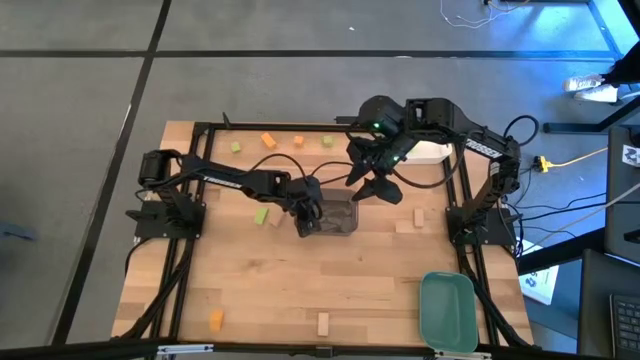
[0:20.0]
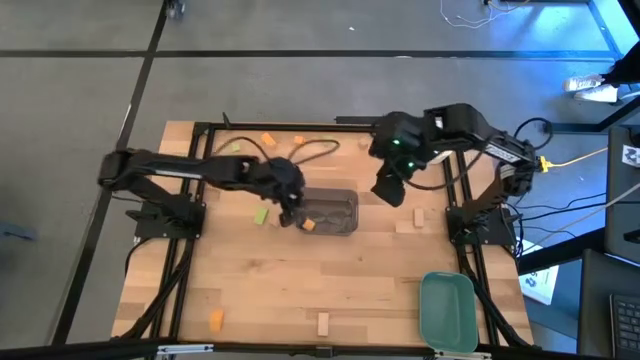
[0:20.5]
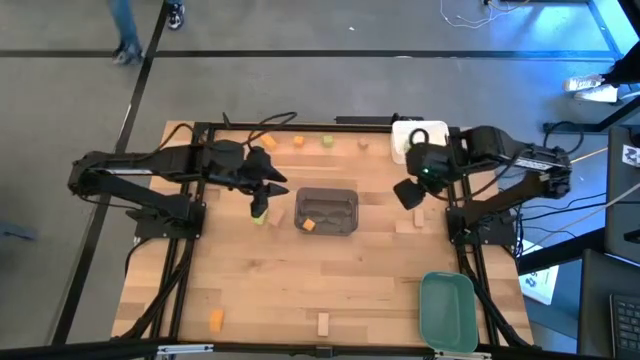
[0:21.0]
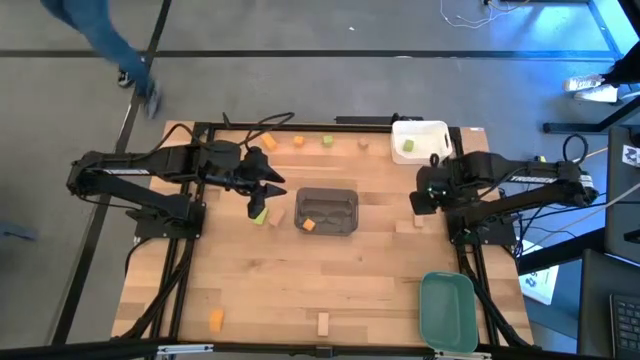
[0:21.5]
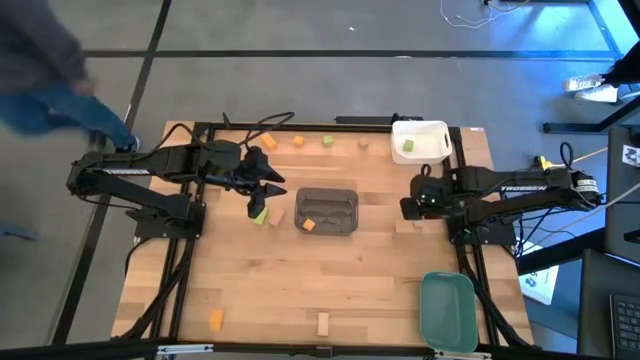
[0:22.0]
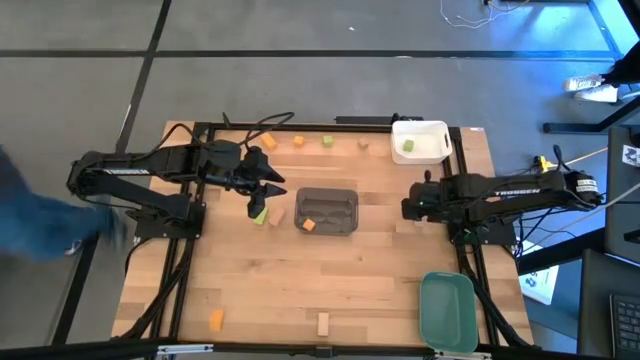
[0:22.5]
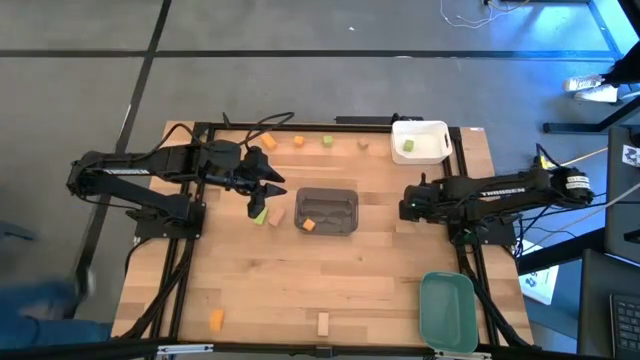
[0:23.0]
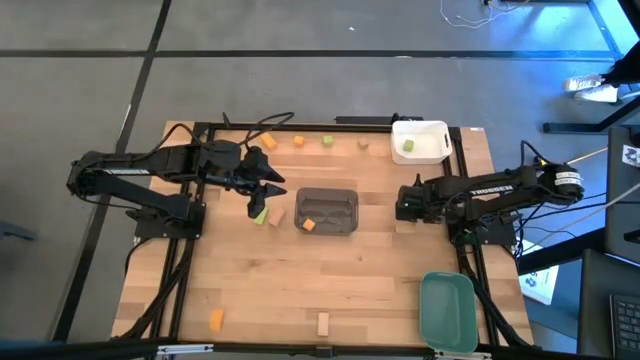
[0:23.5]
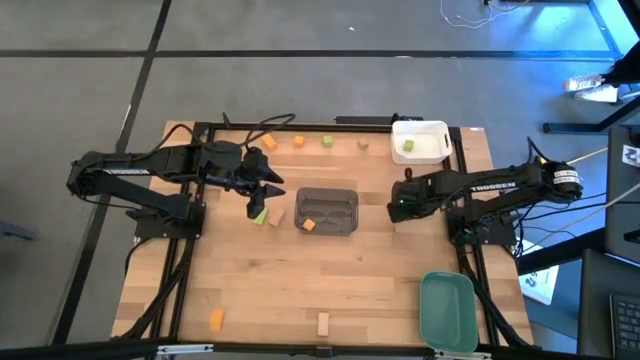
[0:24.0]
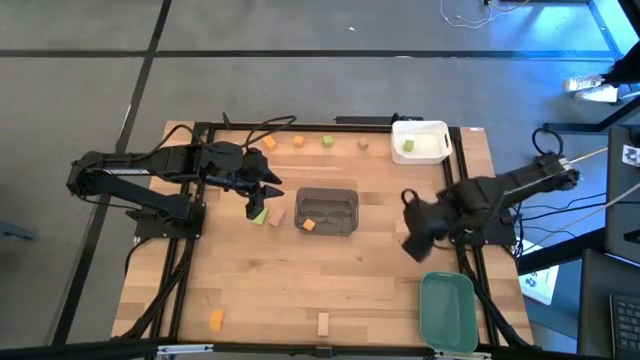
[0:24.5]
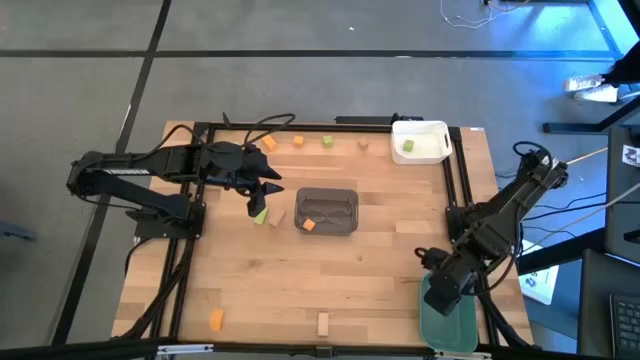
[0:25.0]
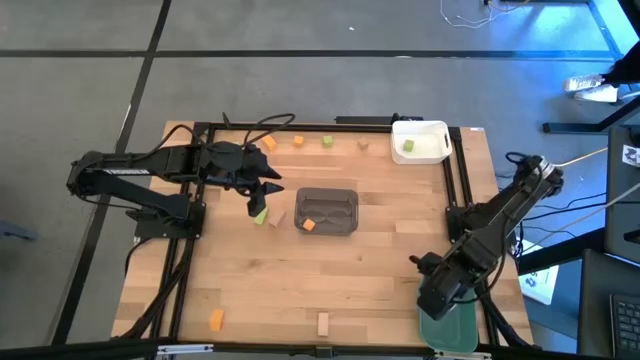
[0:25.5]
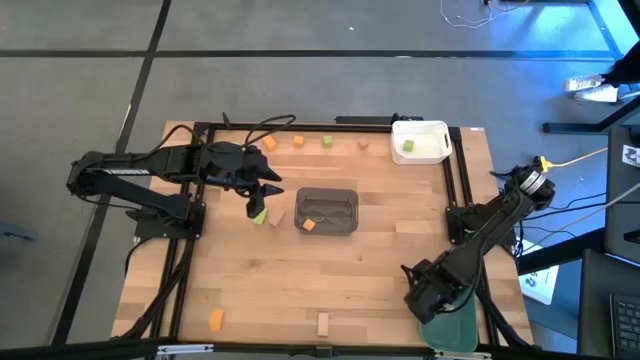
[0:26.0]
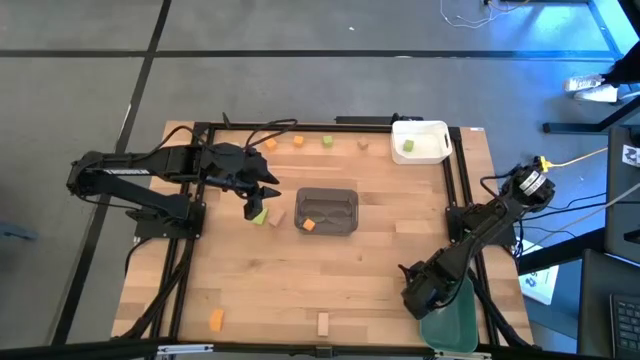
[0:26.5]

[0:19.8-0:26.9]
Task: Sort & place blocks by color
Put the brown block into the blue bin

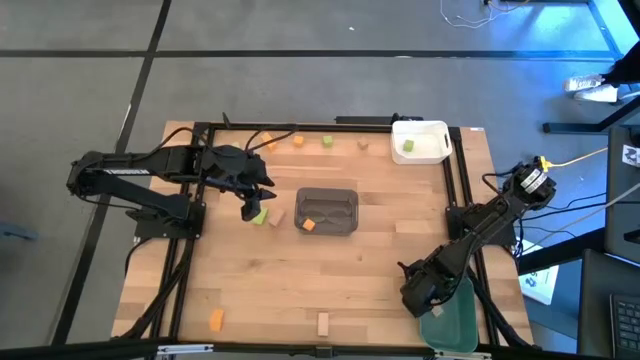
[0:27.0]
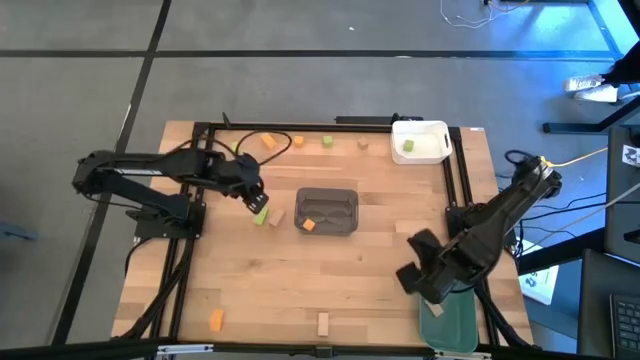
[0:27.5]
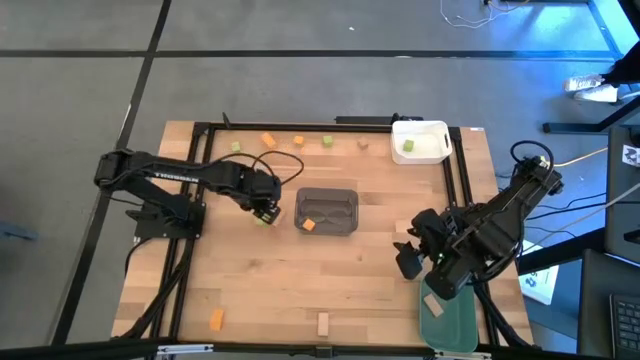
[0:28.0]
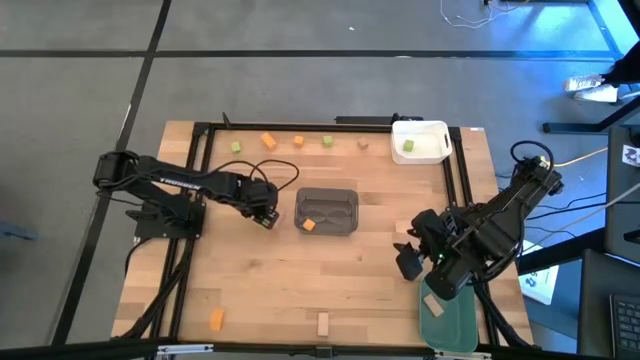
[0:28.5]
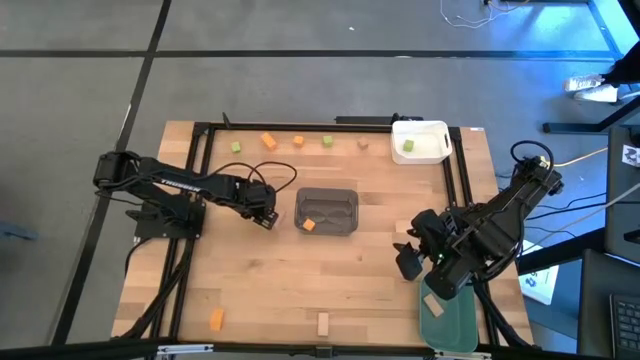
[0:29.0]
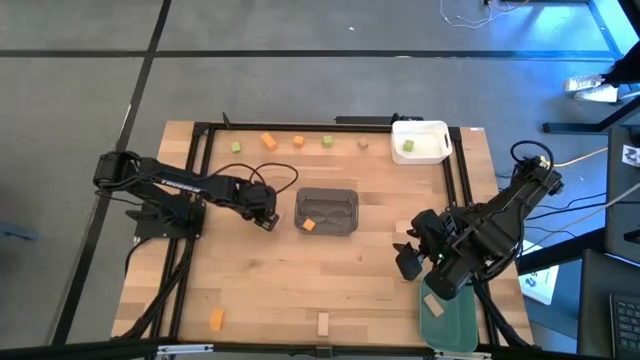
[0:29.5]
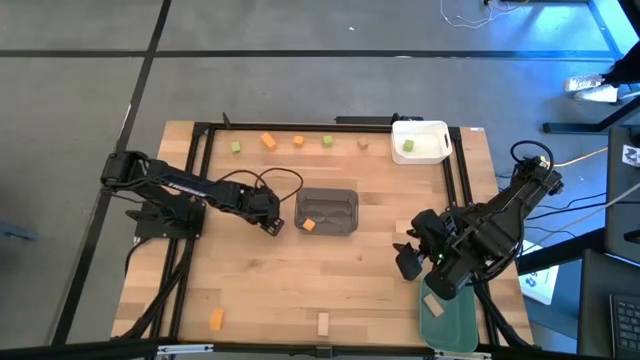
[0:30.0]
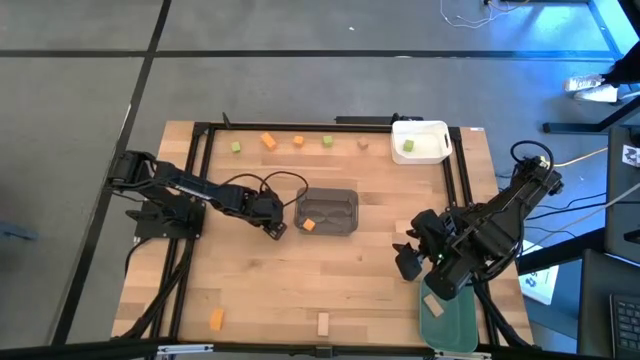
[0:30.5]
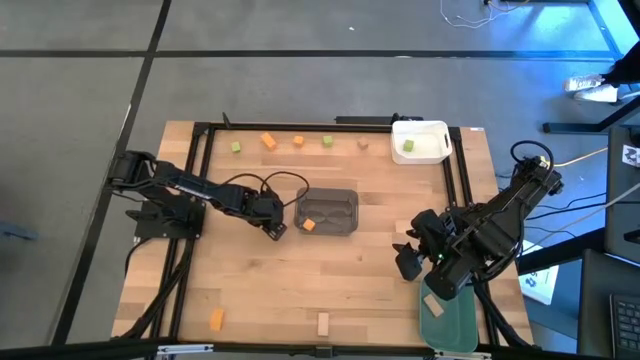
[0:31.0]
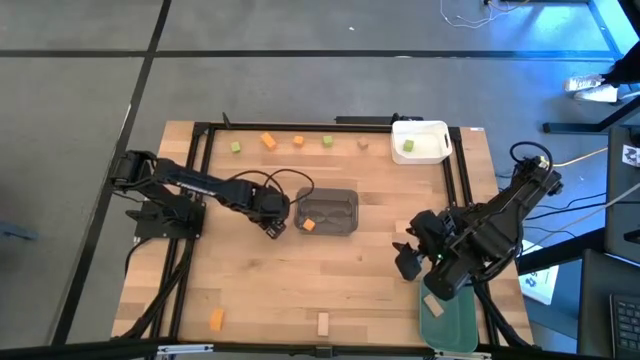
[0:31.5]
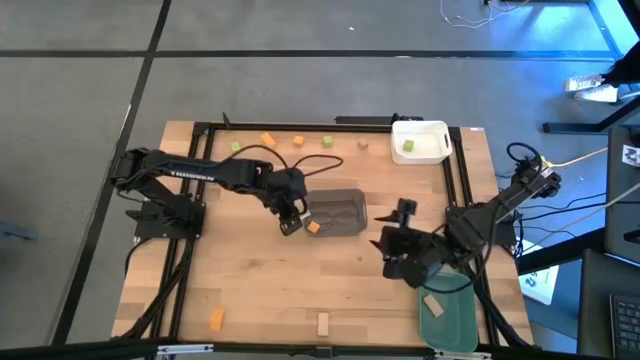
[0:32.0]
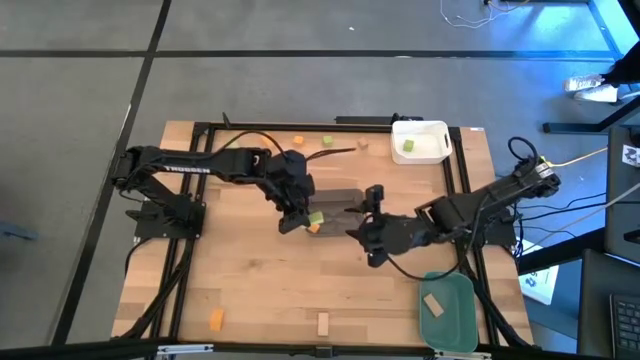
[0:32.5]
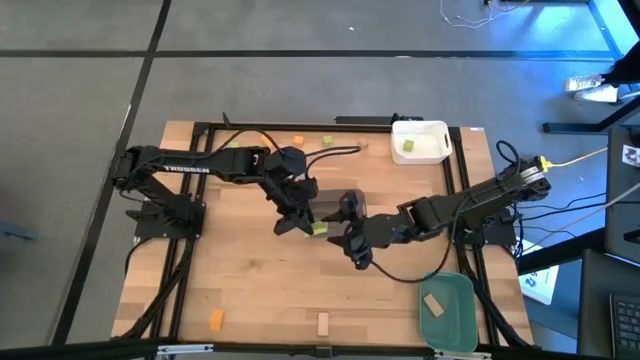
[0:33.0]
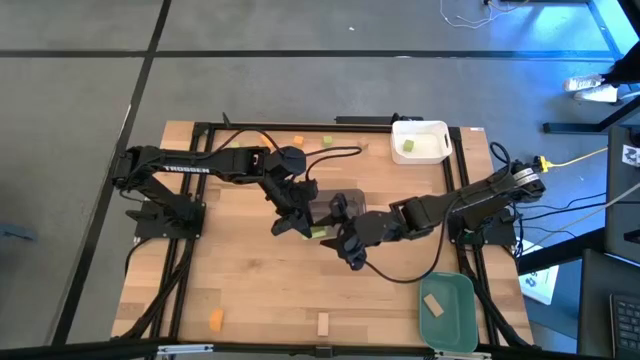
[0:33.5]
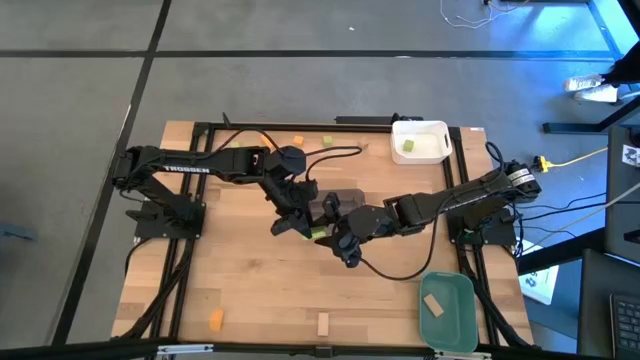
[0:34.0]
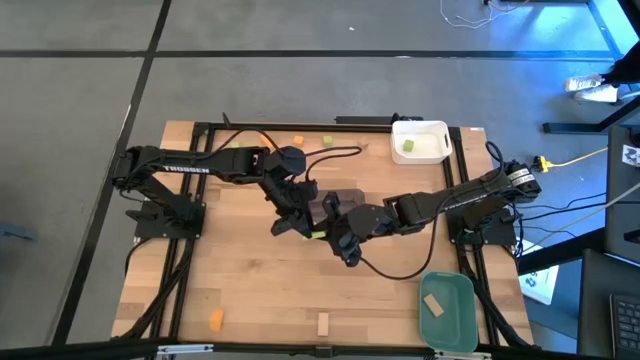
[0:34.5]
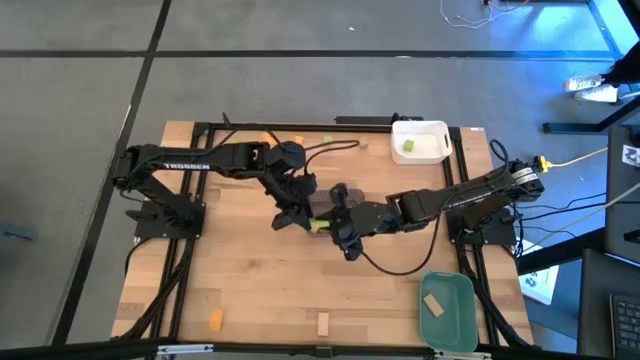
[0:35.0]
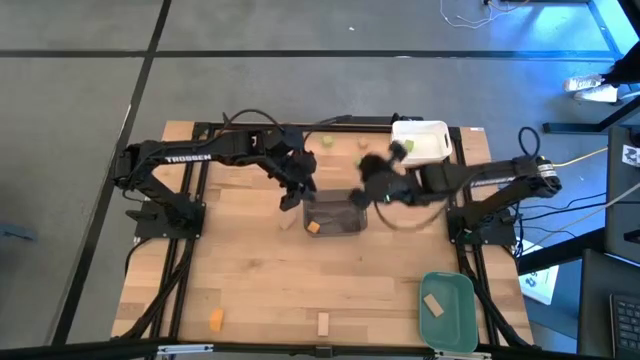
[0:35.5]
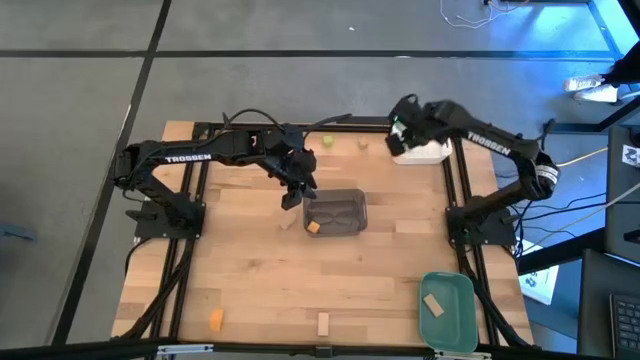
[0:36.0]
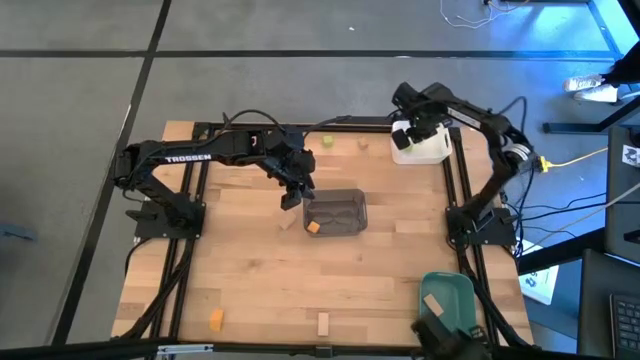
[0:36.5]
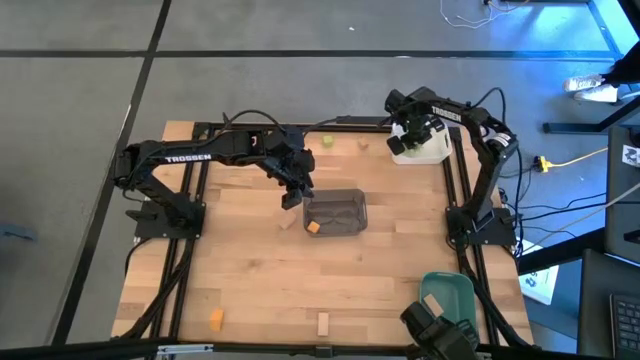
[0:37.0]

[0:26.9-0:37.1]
Put the green block into the white bin

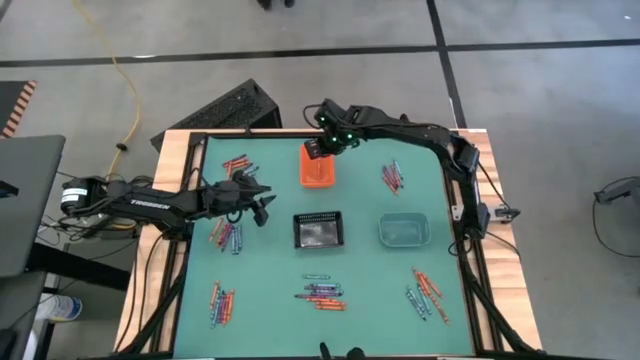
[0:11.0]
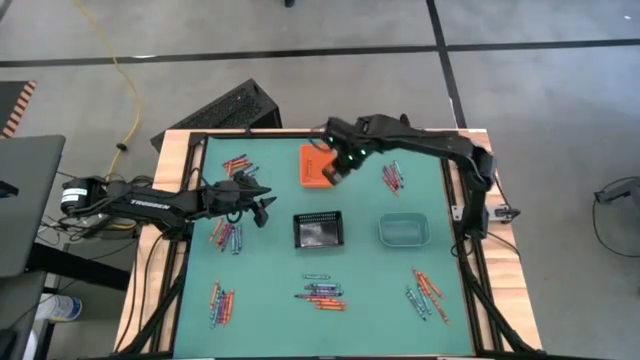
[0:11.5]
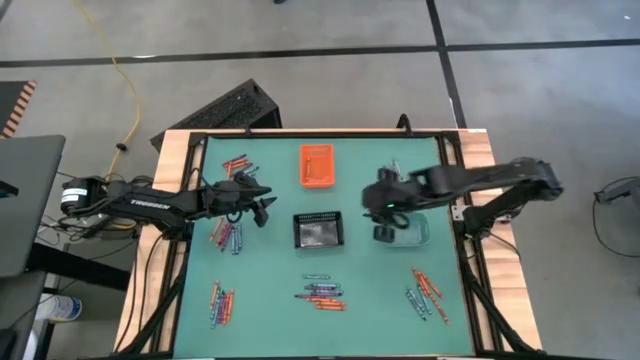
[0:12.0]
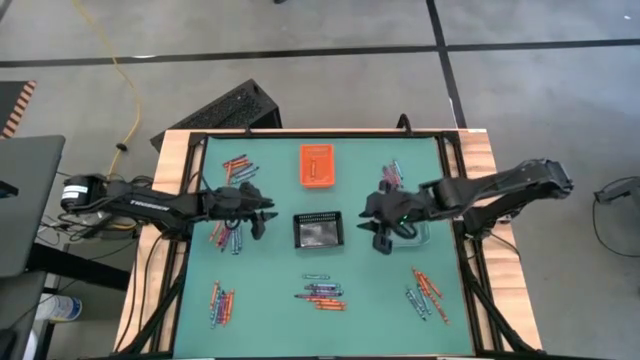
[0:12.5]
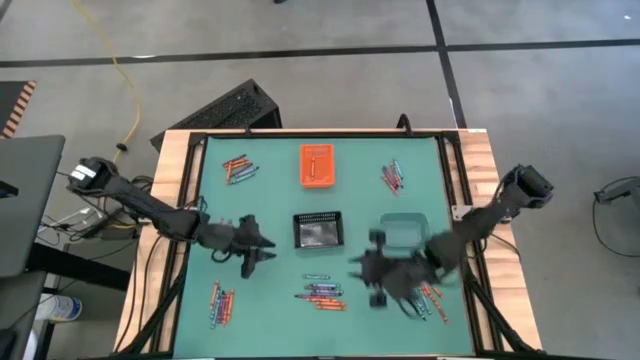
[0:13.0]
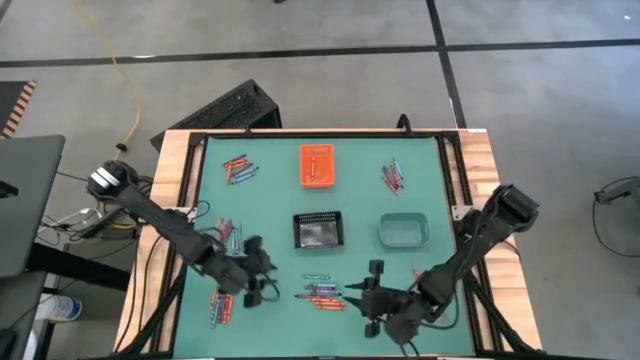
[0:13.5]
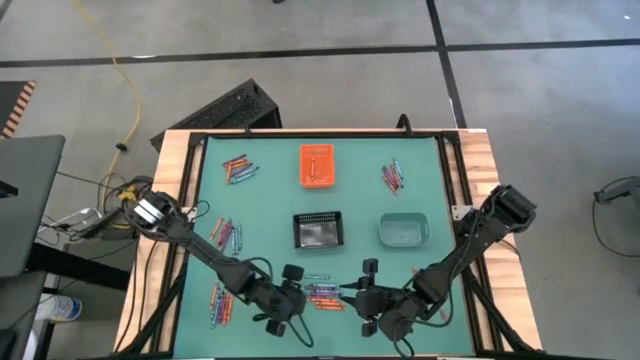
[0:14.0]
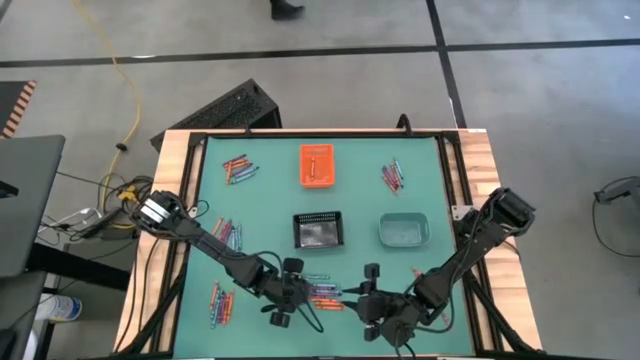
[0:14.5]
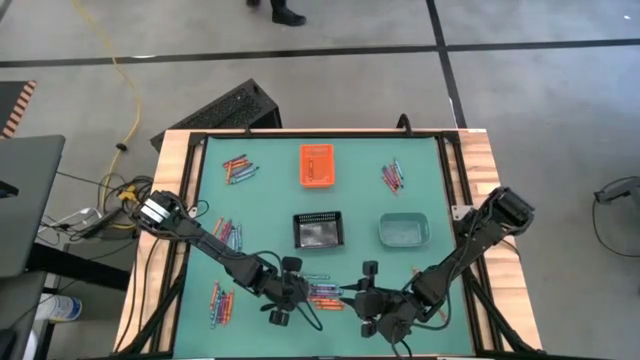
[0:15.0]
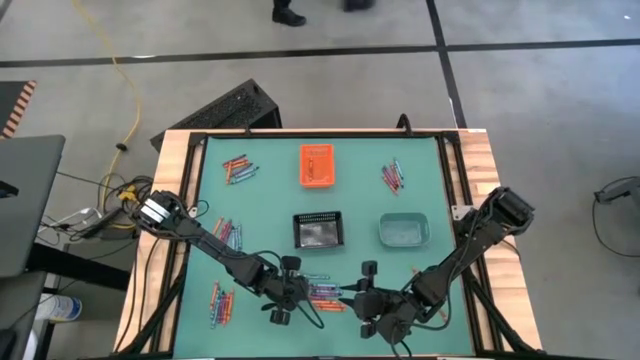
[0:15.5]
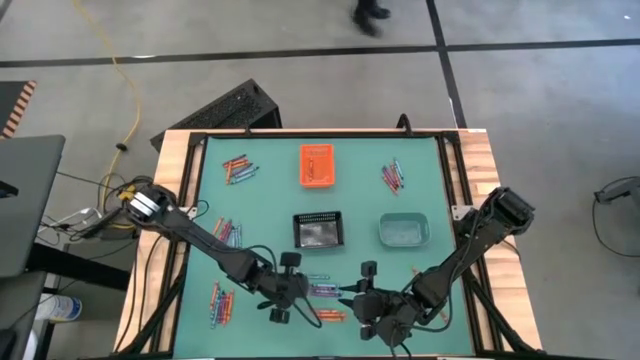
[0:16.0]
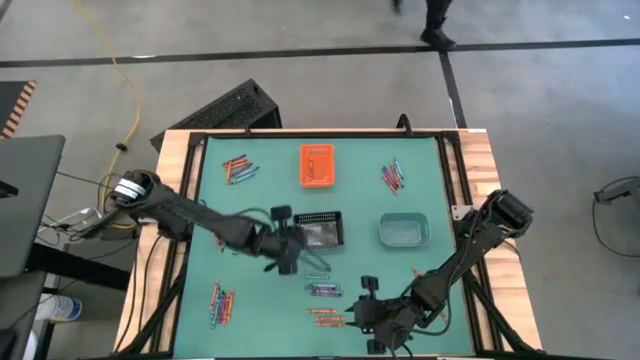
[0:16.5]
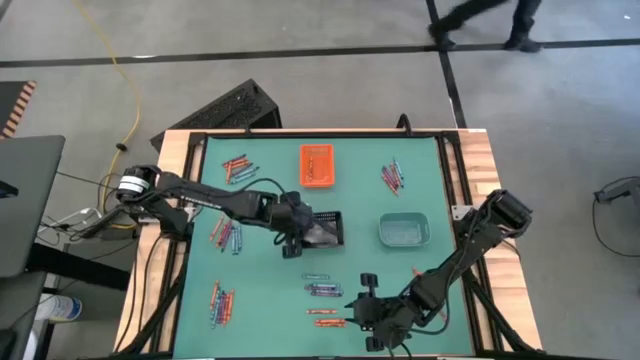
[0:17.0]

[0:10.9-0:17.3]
Task: Sort crayons
Put the violet crayon into the black bin
